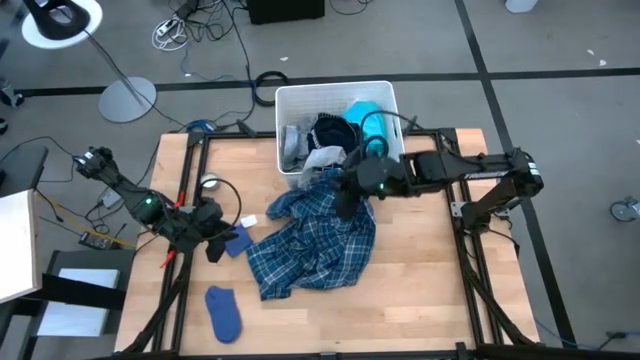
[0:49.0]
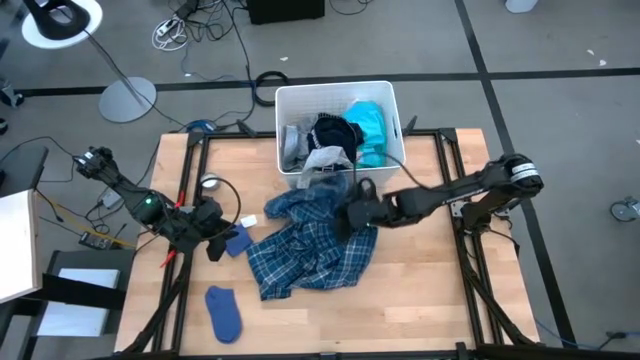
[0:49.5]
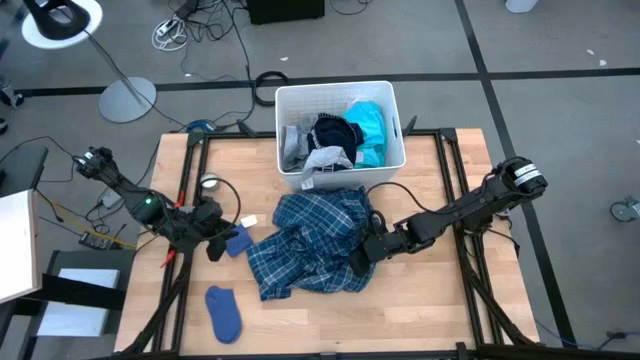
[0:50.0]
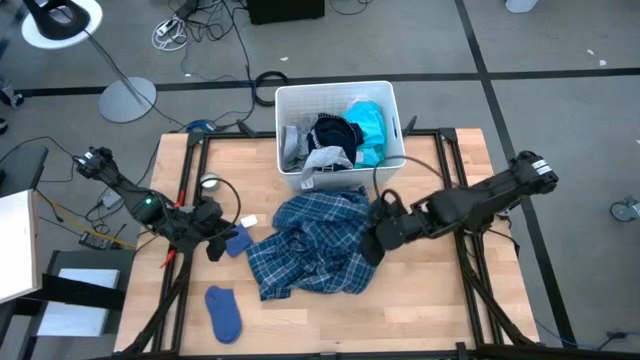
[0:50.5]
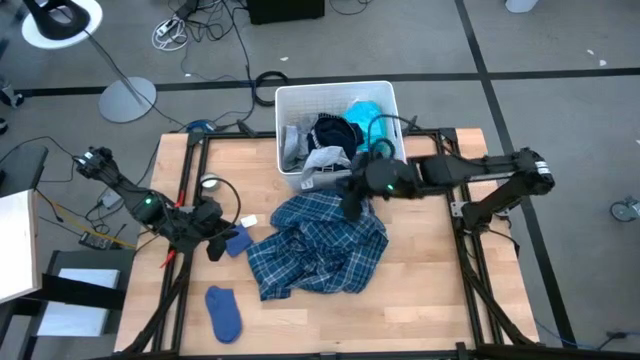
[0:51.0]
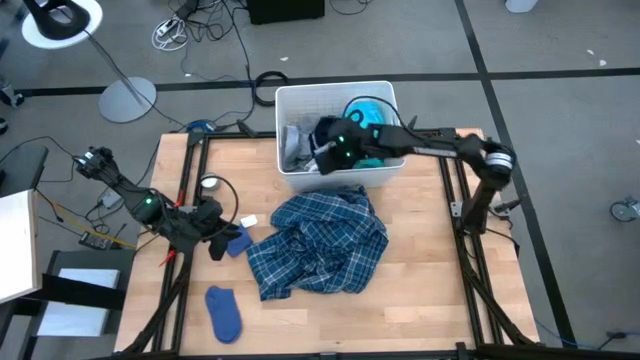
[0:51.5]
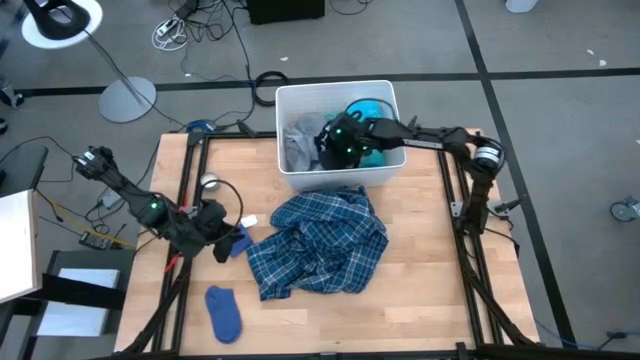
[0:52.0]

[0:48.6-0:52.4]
Task: Sort clothes
Put the gray sock into the laundry bin

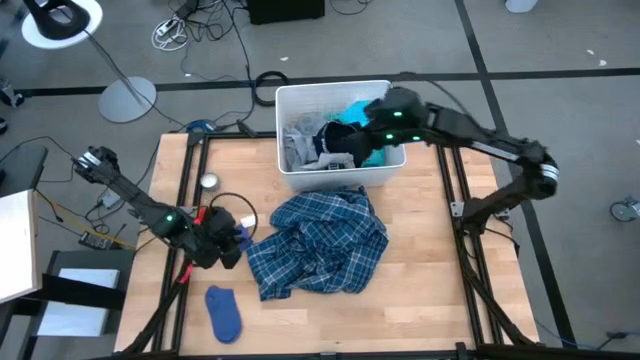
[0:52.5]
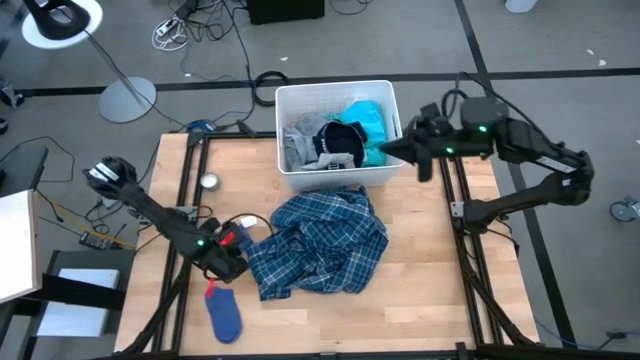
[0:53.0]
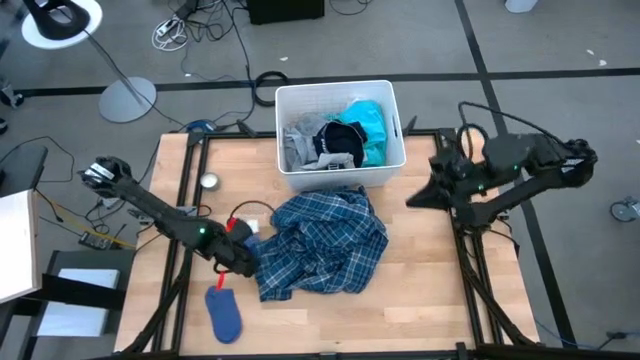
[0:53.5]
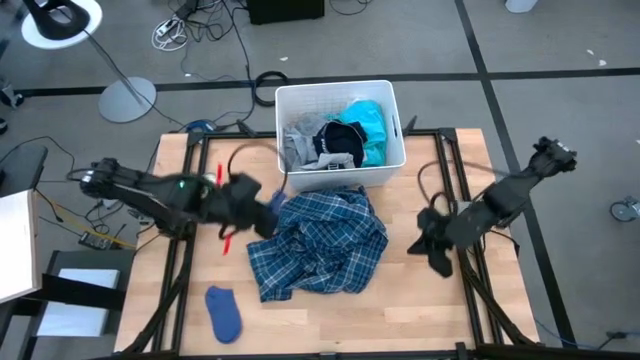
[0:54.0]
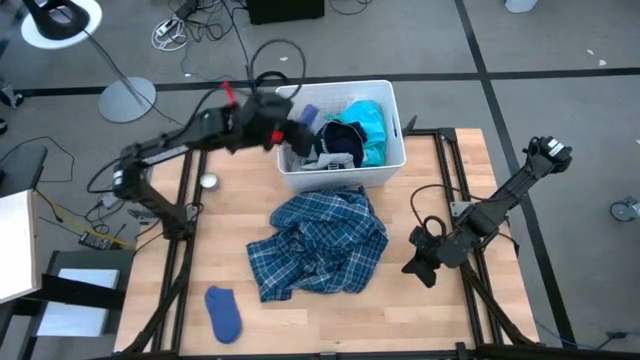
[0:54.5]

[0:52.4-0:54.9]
Put the top purple sock into the laundry bin

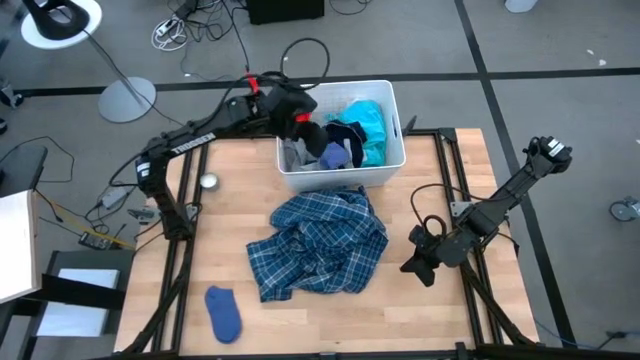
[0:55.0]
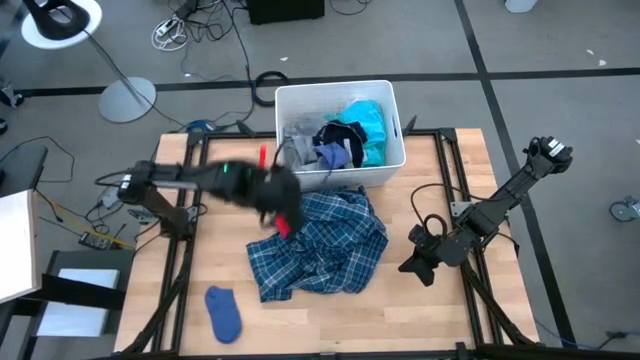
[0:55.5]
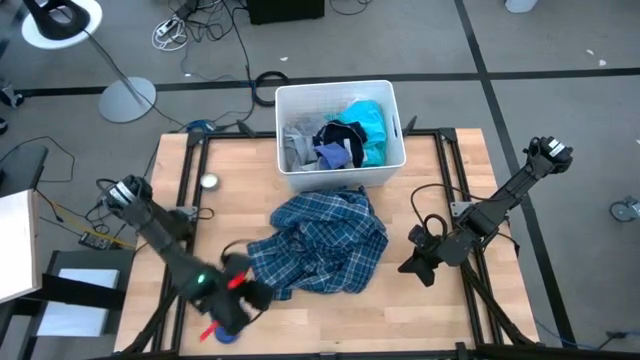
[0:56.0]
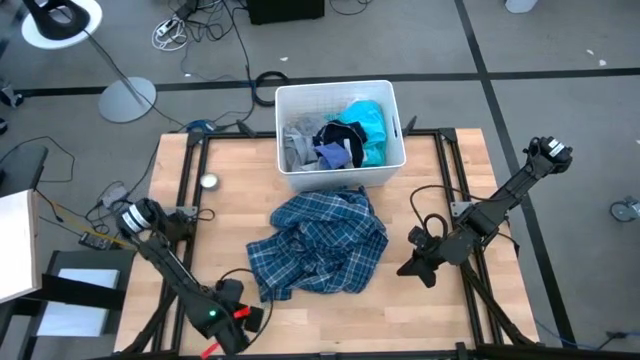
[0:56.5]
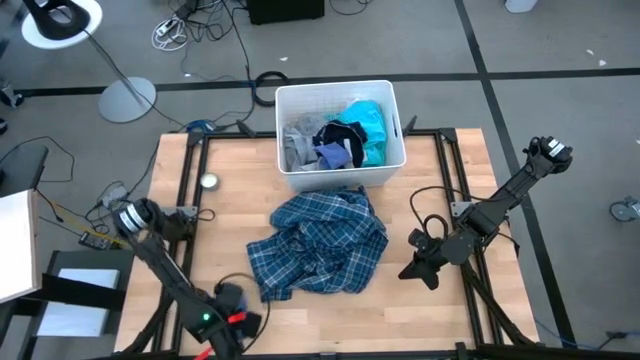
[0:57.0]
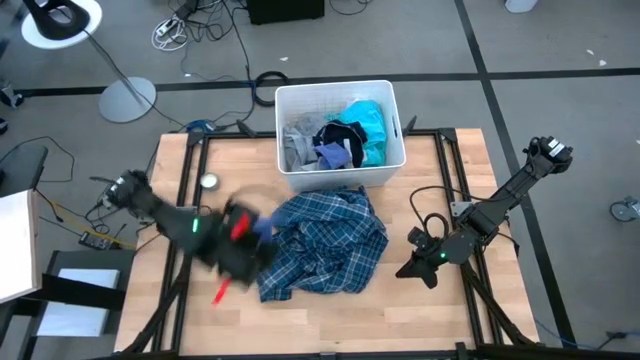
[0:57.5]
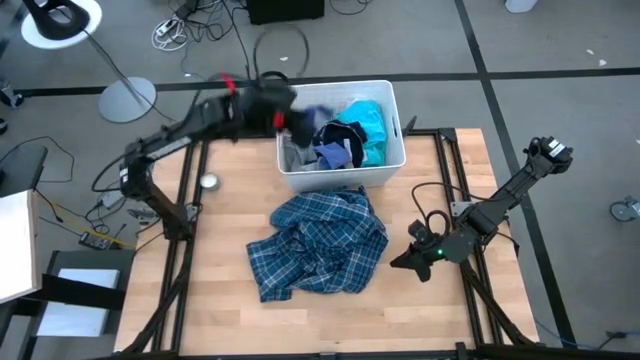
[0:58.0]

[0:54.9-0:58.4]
Put the purple sock into the laundry bin

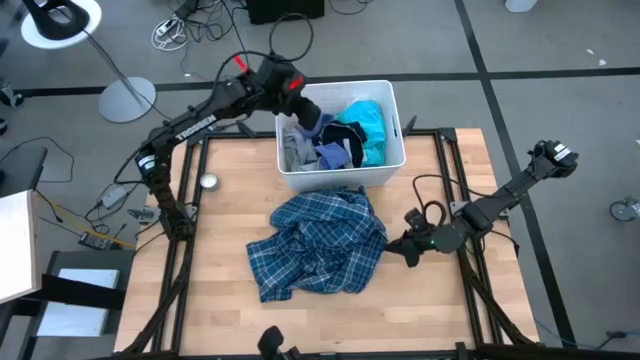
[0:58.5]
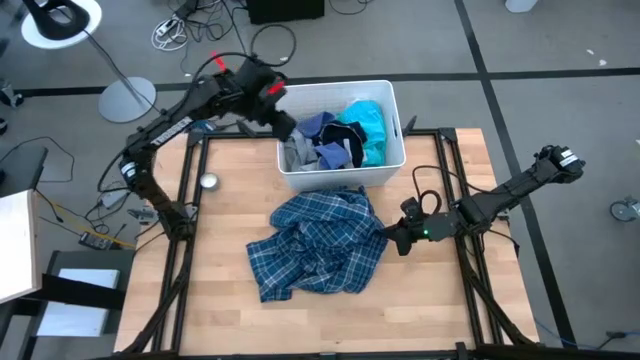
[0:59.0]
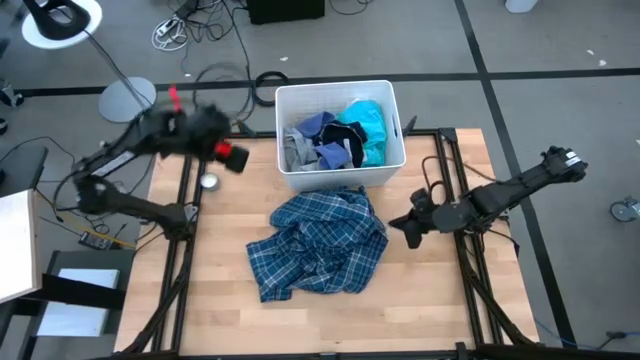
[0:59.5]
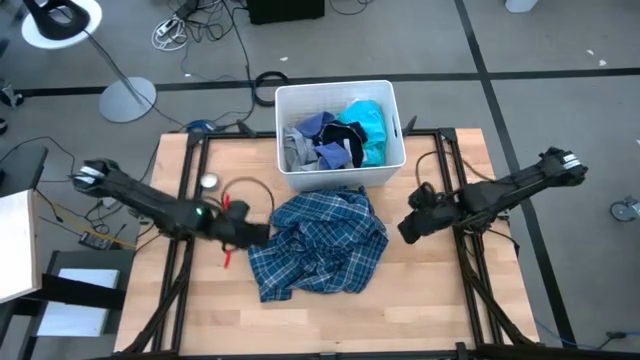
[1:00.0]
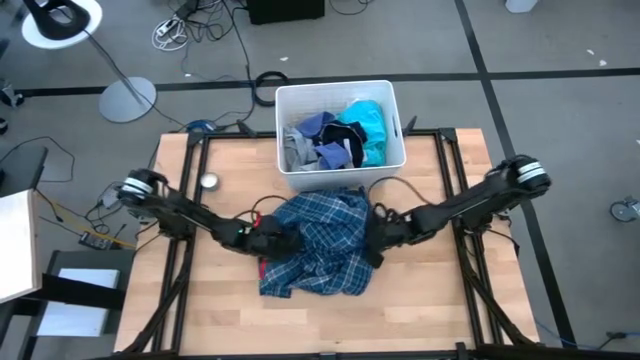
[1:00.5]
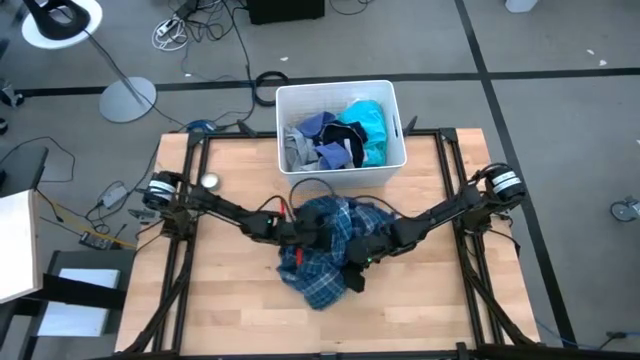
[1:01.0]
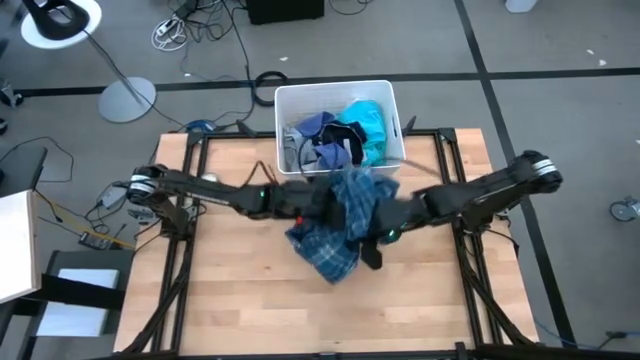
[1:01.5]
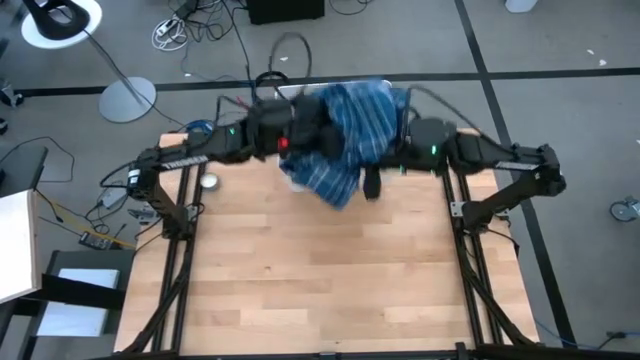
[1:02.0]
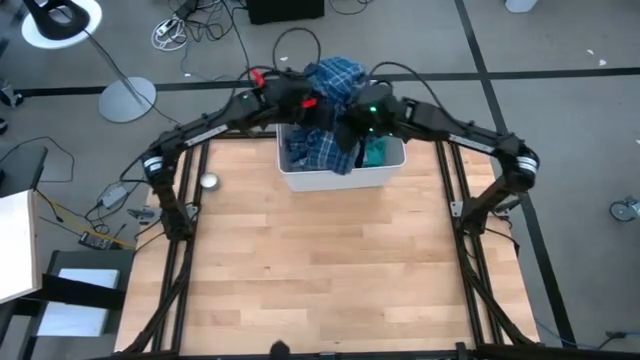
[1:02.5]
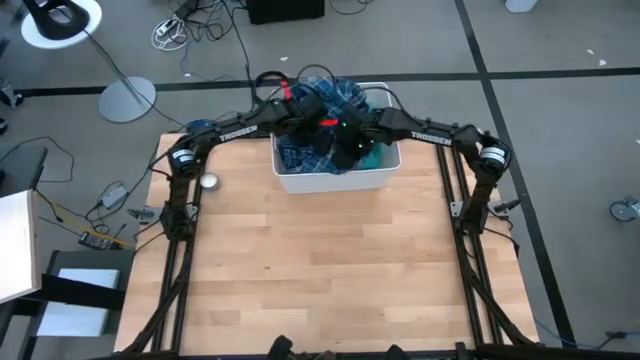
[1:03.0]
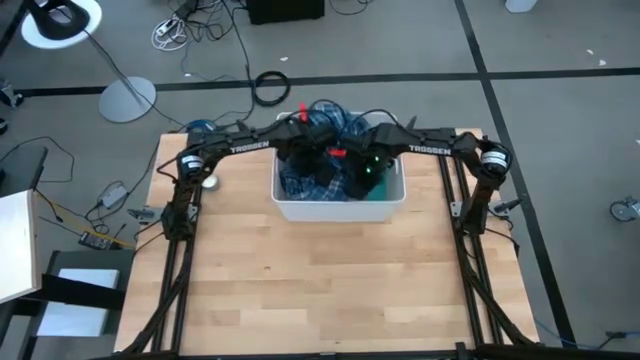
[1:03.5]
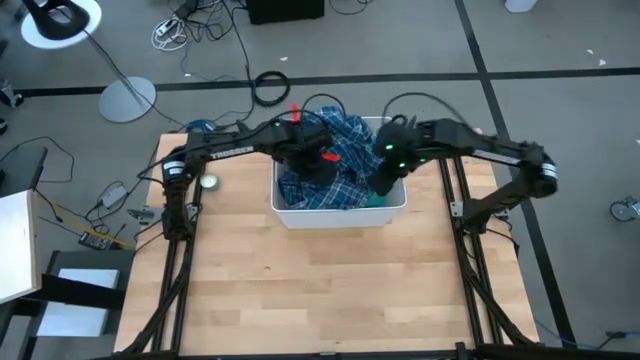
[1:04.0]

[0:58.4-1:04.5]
Put the blue polo shirt into the laundry bin

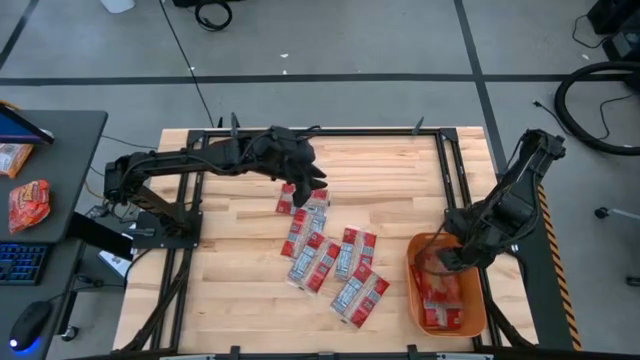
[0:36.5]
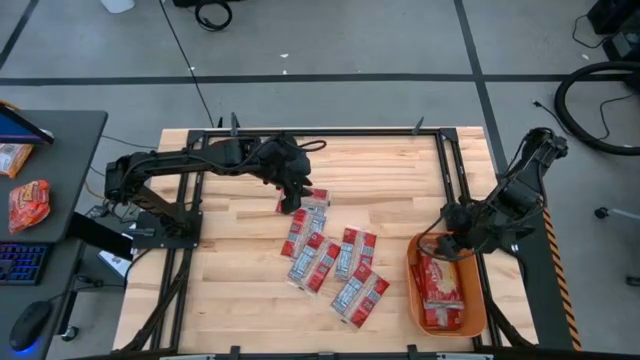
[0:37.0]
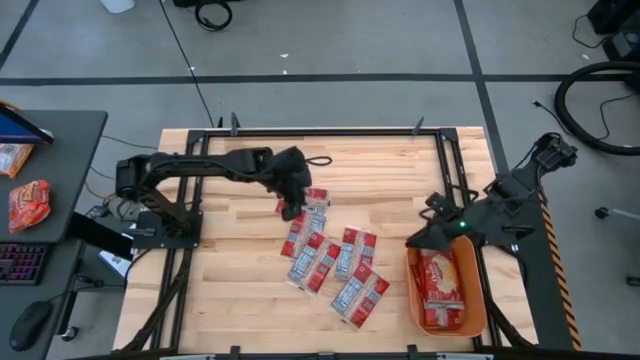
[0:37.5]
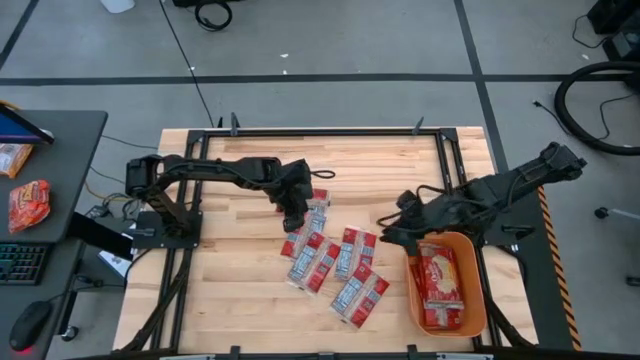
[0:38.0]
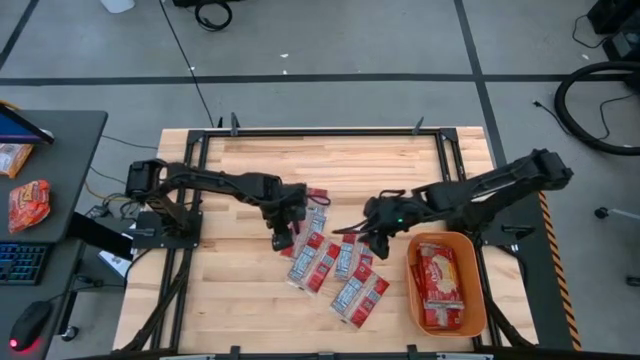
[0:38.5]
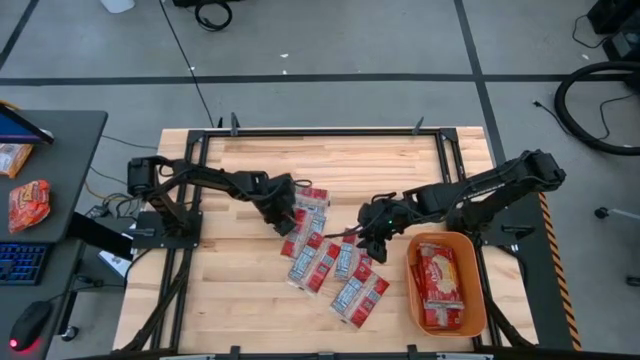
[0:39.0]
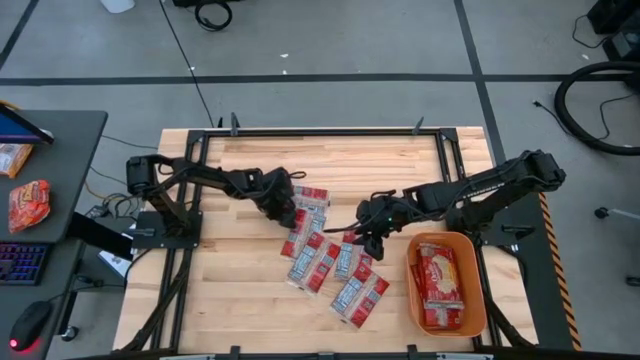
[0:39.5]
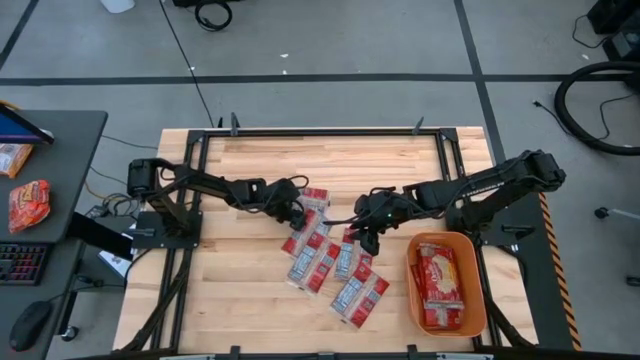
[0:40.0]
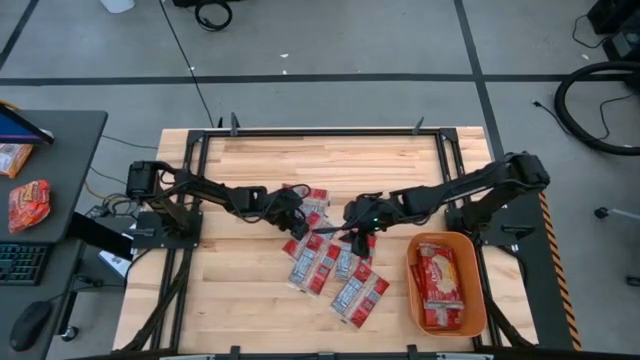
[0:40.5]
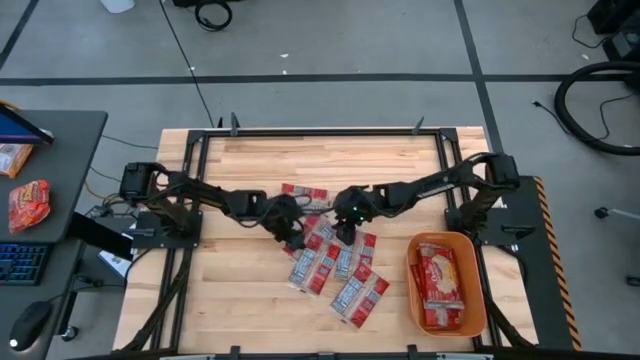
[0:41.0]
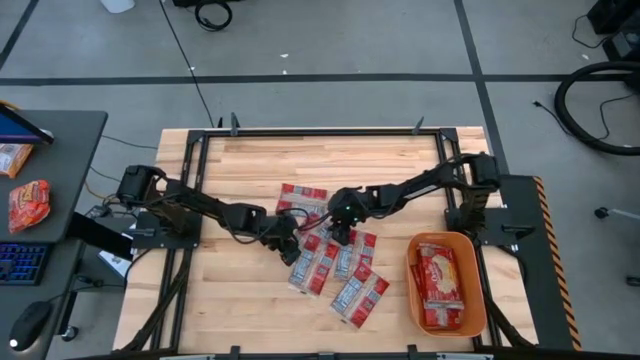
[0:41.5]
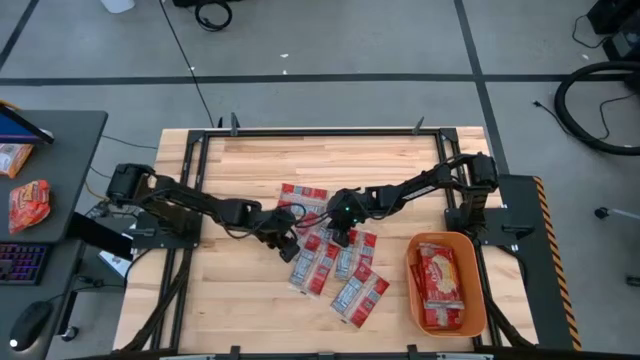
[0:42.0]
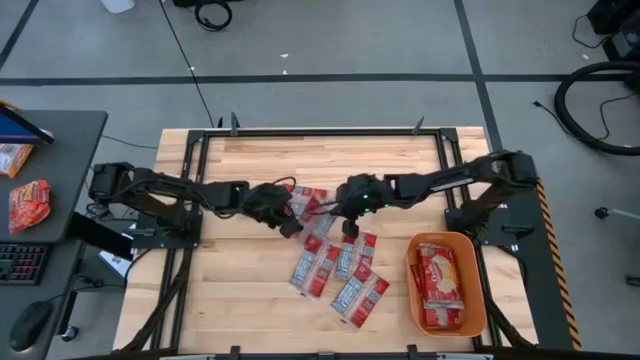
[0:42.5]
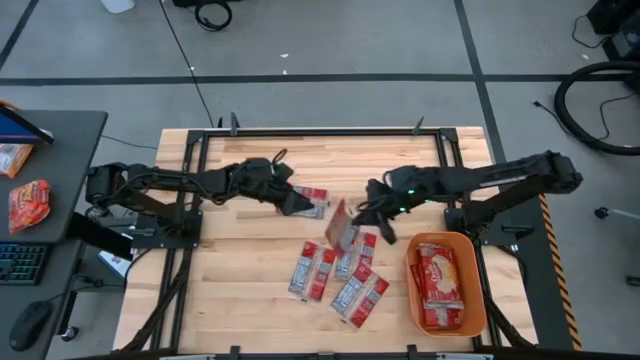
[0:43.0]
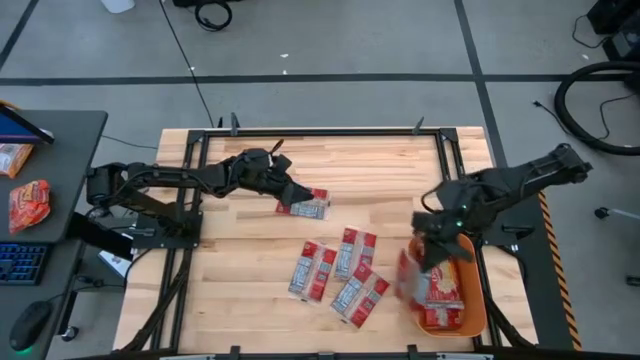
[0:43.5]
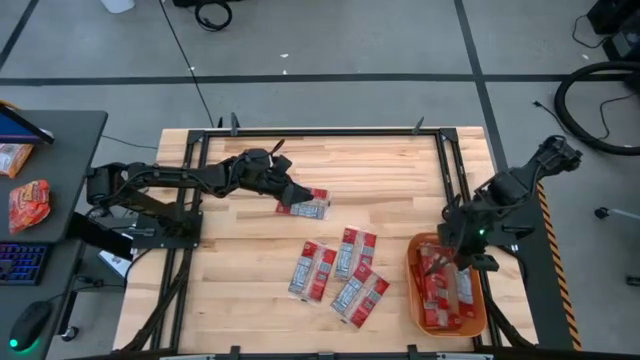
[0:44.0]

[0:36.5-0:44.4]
Task: Sort popcorn bags into baskets
Put the red popcorn bag into the orange bin
